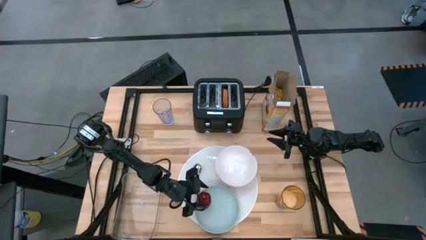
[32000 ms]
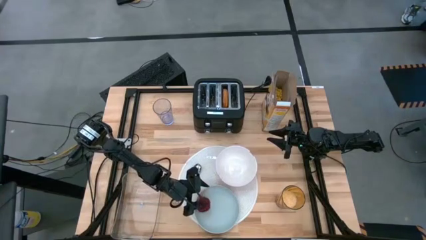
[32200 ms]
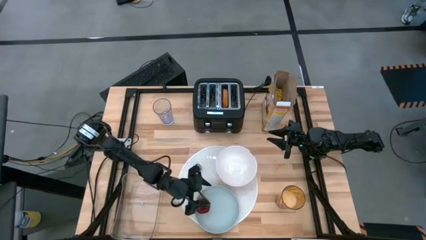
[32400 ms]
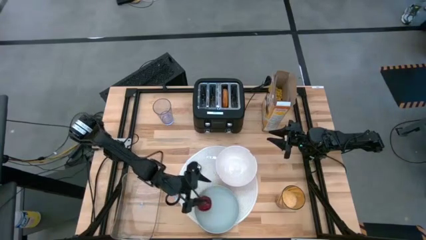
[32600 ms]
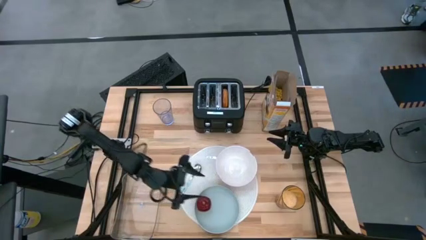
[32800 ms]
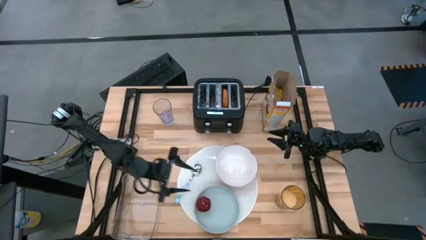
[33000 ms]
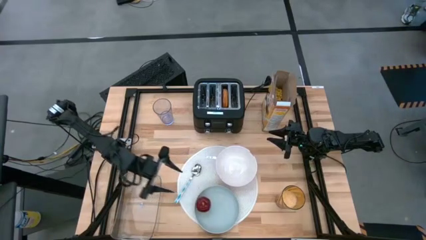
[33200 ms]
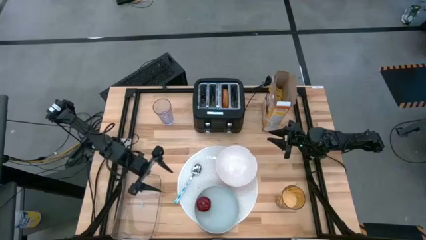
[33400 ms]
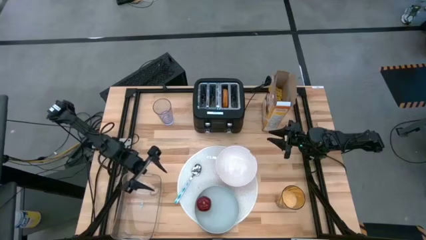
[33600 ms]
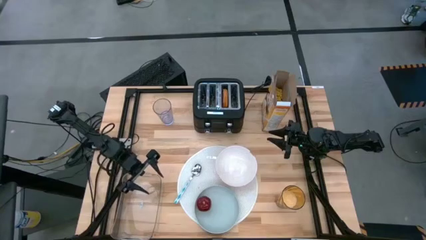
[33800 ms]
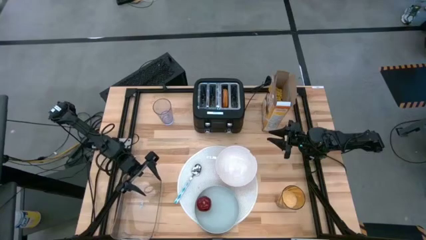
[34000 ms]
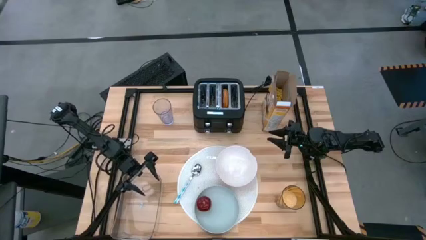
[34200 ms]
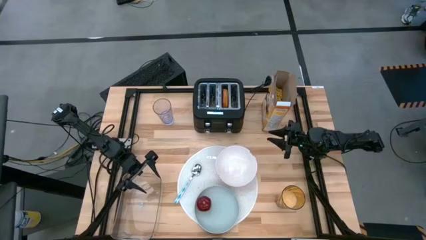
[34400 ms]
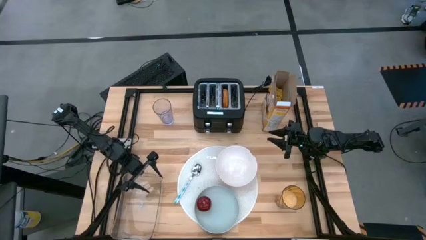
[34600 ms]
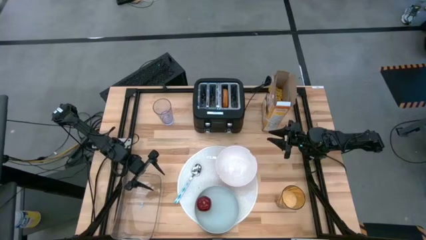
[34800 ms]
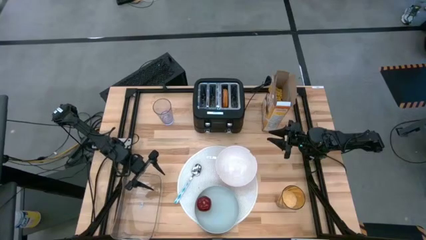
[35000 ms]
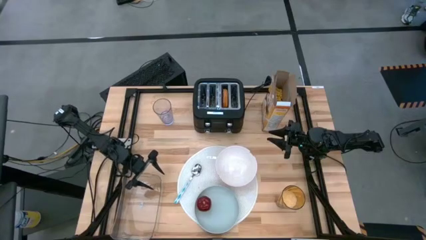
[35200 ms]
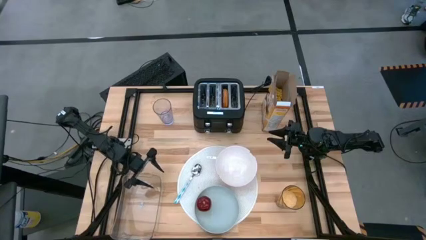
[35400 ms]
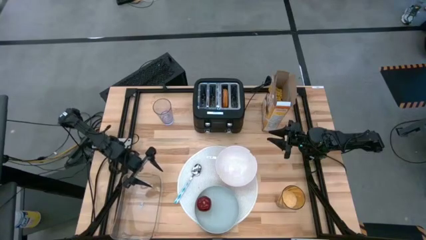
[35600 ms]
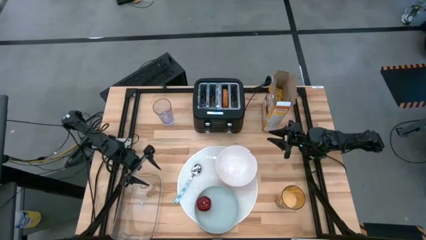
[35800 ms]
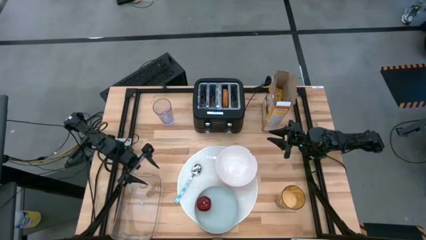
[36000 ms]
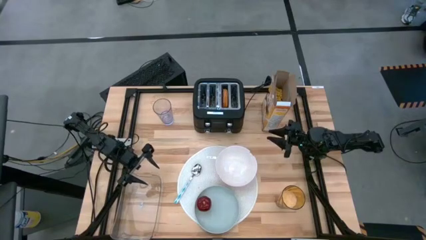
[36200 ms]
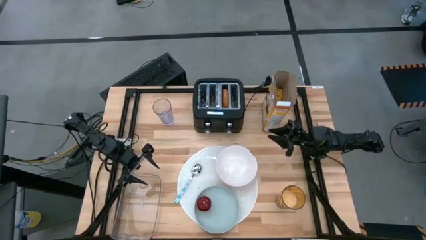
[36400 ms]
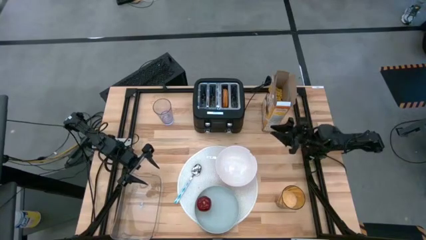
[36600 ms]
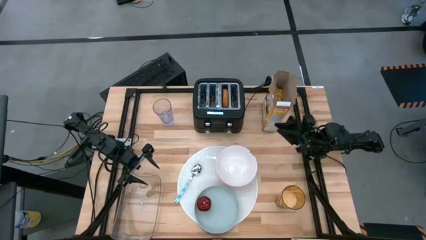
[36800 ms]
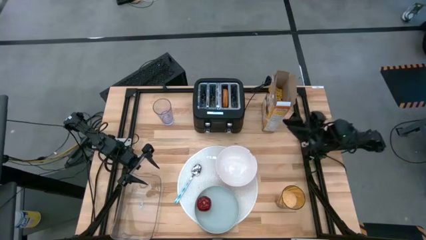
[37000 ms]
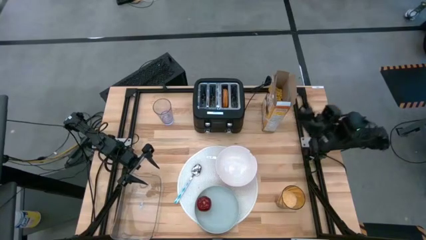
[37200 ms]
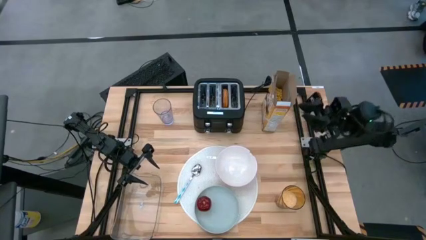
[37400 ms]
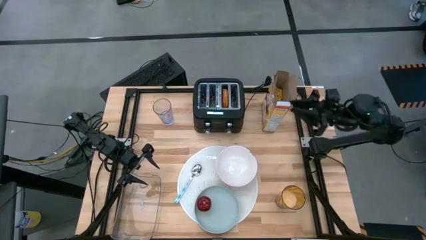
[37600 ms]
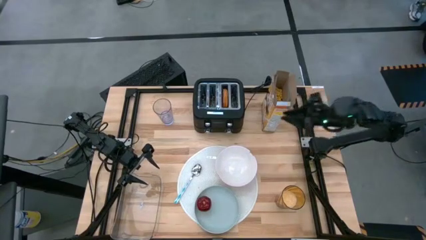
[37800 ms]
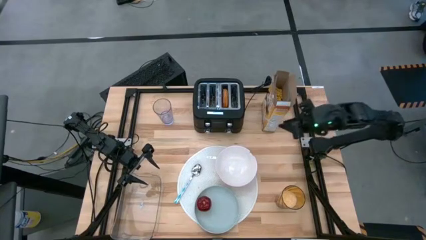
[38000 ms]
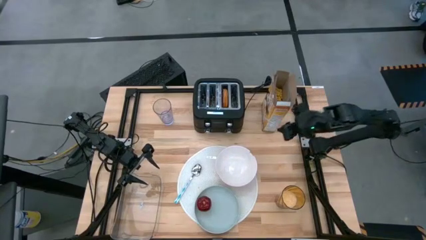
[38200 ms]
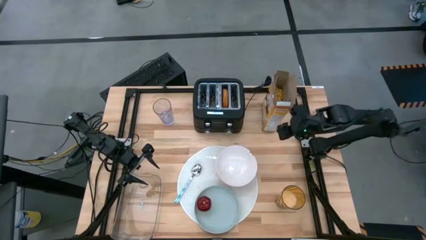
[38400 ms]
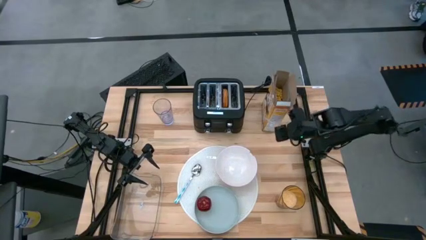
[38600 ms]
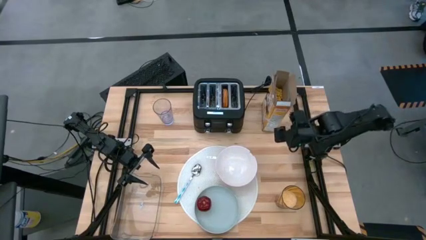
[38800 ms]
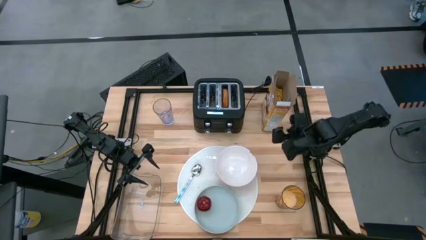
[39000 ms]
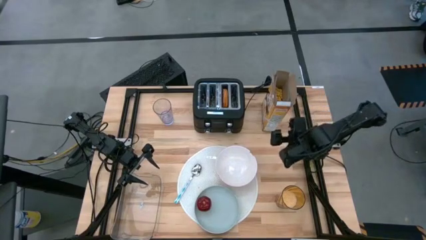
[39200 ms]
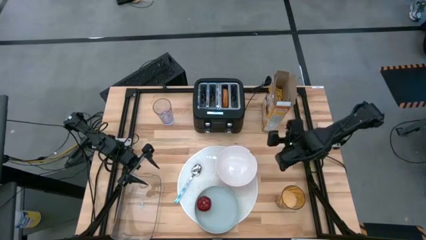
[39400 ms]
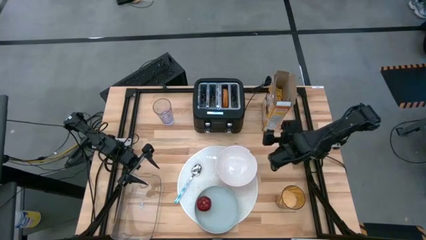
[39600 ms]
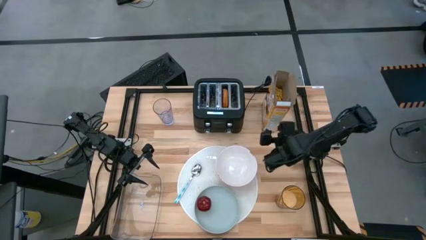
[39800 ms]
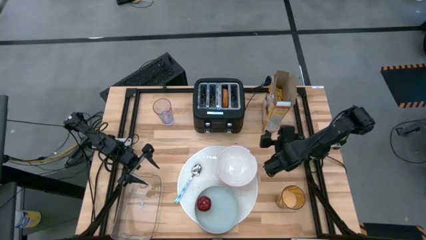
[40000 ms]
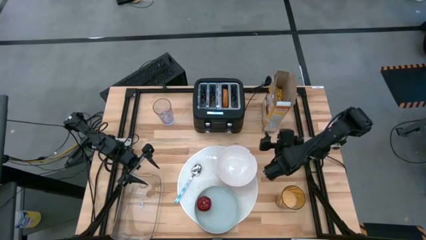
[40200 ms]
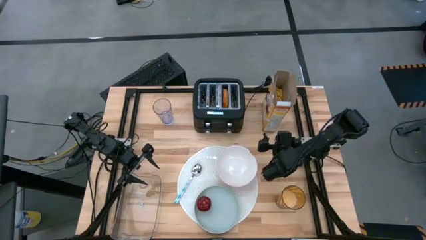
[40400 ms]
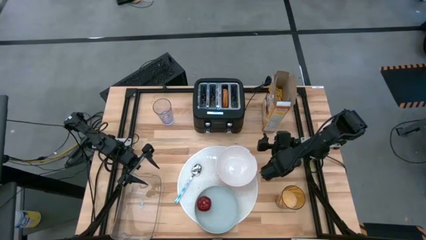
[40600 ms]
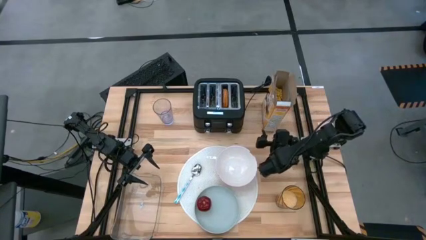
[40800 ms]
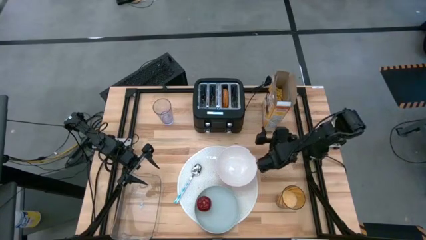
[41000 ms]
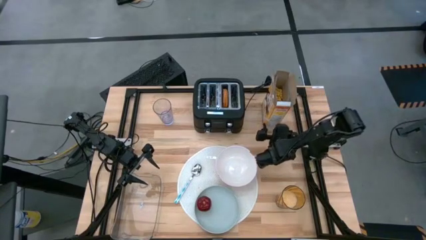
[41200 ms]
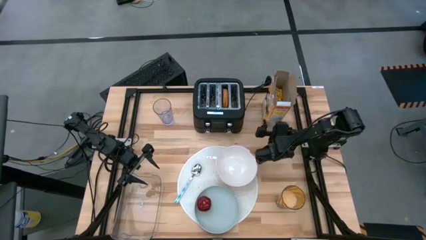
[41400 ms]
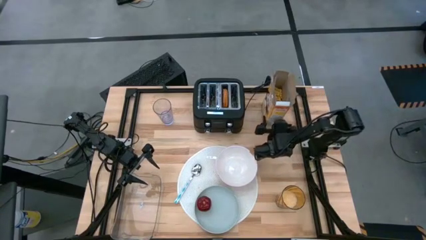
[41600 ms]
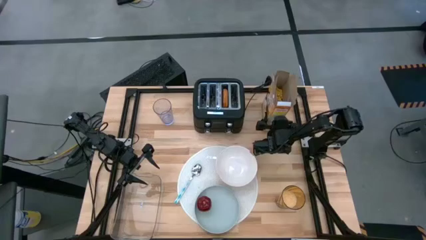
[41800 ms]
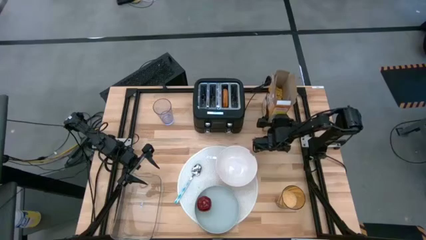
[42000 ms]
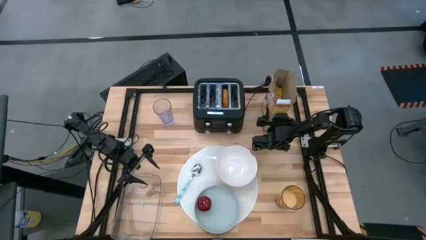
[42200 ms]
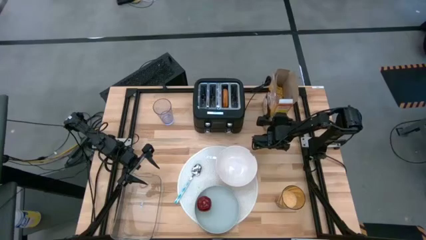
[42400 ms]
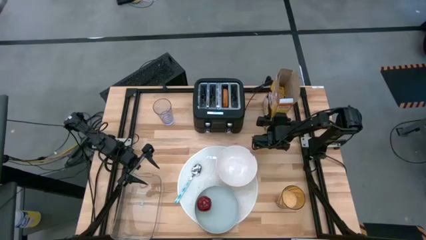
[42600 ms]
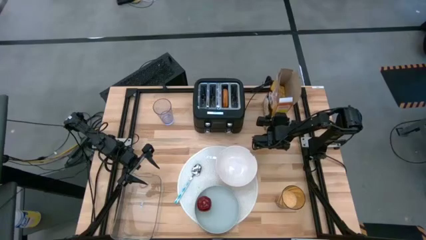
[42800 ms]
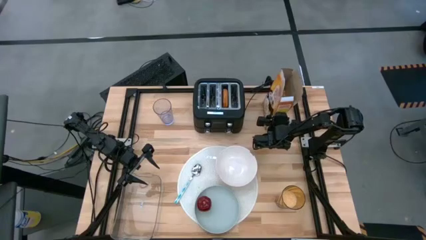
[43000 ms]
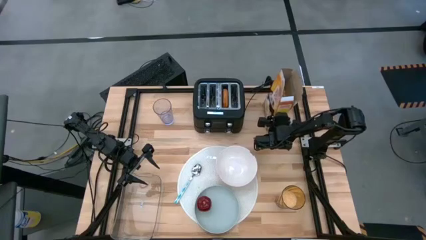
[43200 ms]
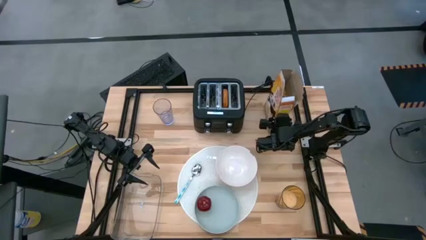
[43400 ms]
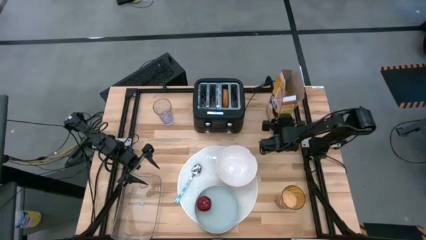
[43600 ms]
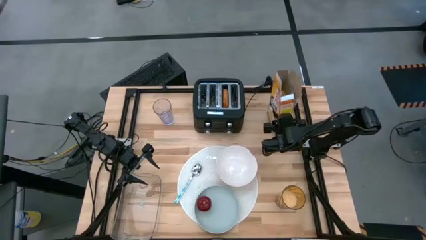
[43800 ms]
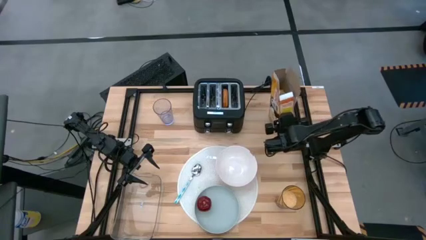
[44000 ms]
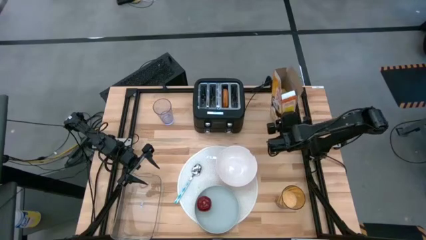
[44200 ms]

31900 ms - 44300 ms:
Task: Arrange a breakfast setting
Pour the cereal from the cereal box into the white bowl
